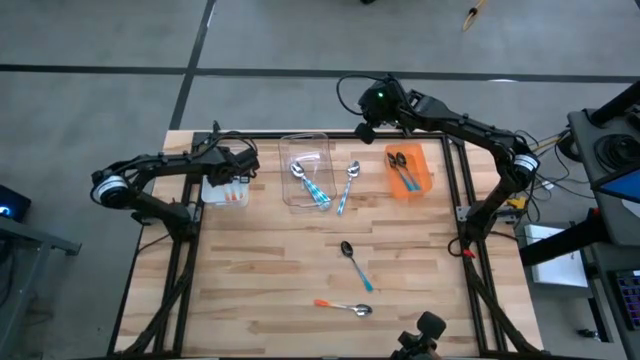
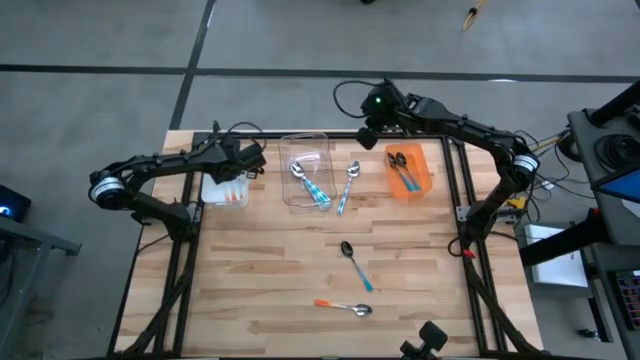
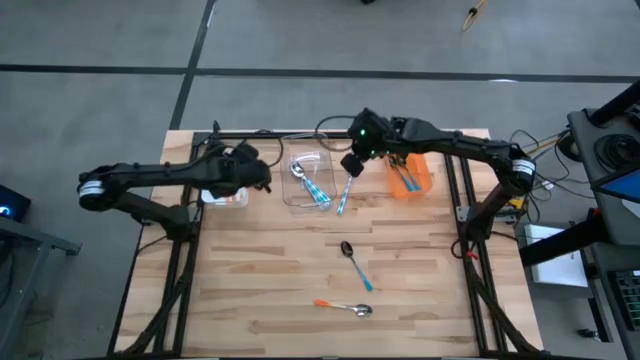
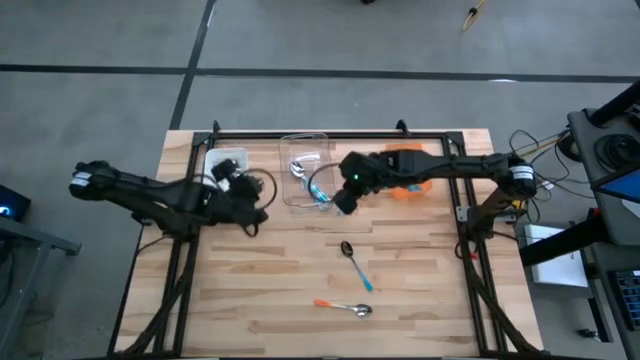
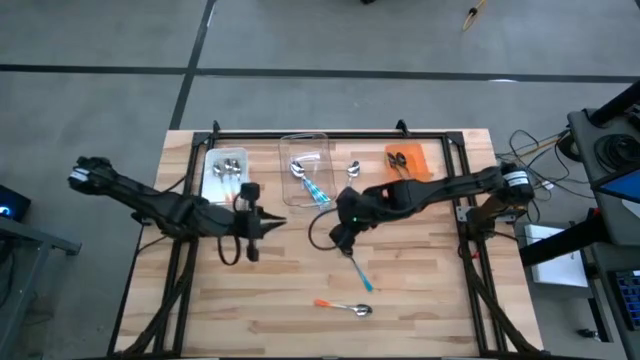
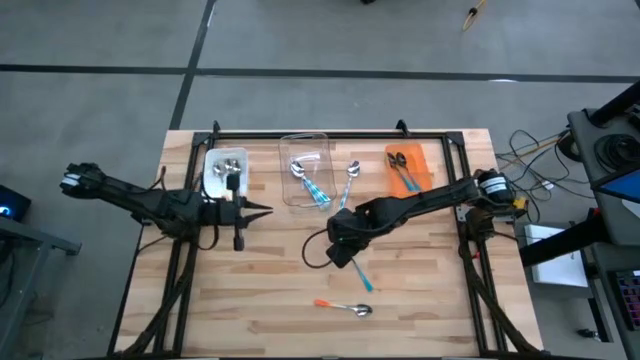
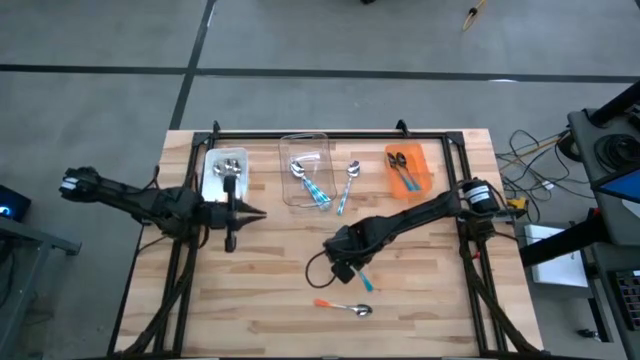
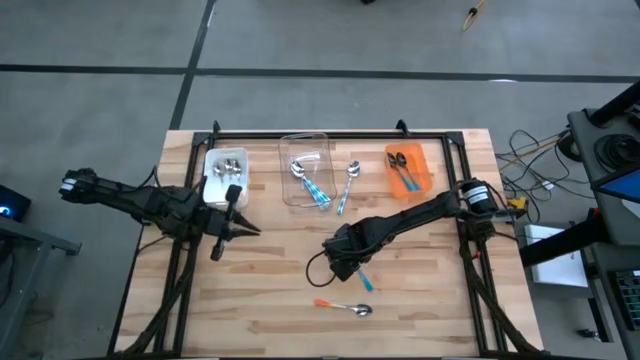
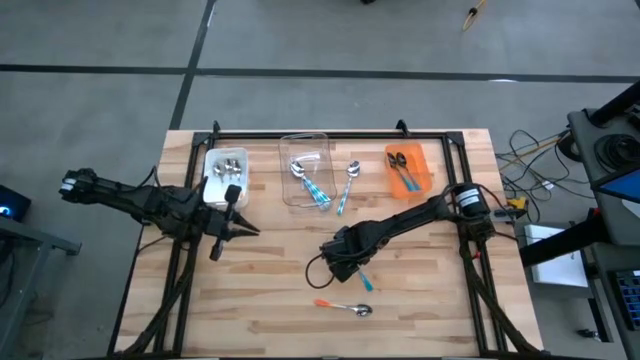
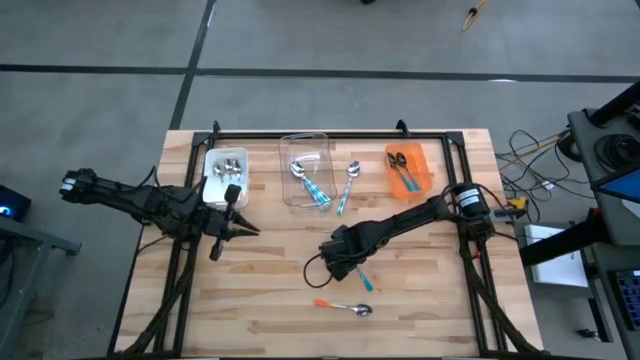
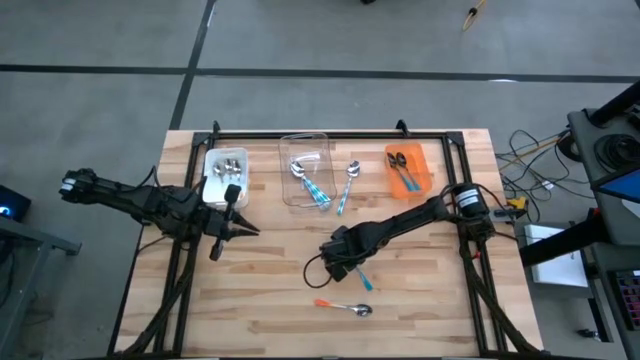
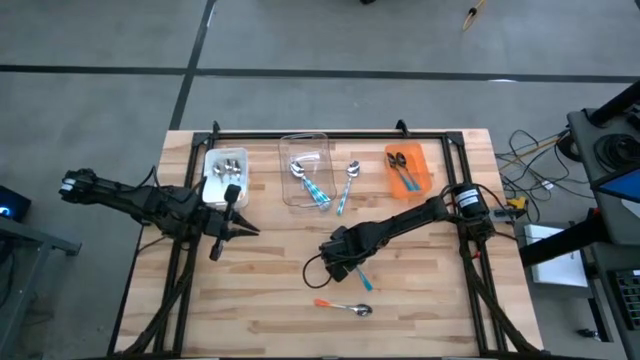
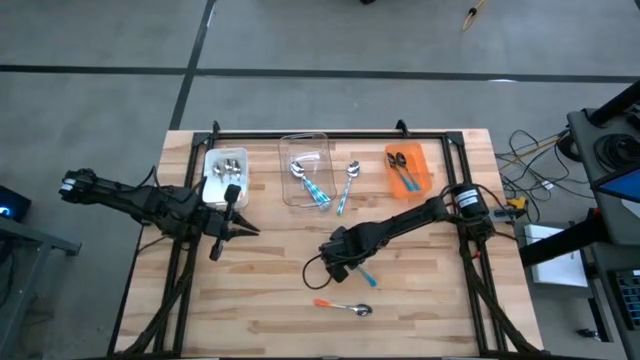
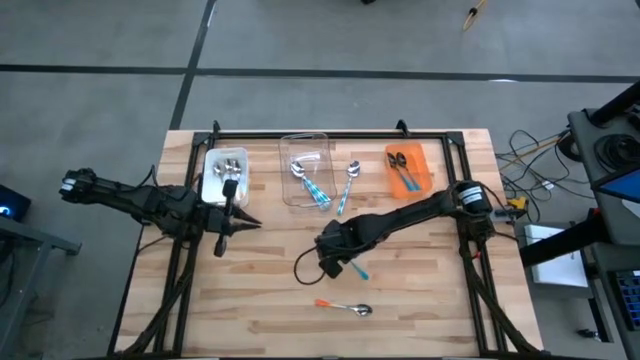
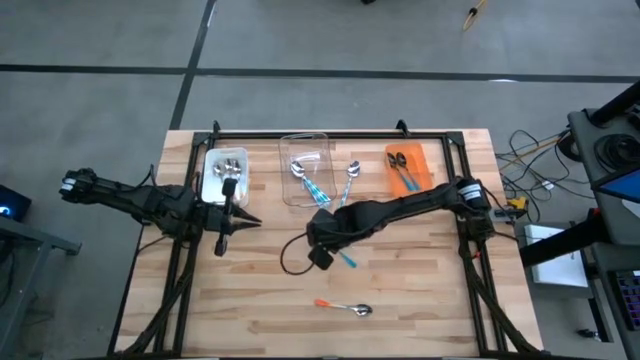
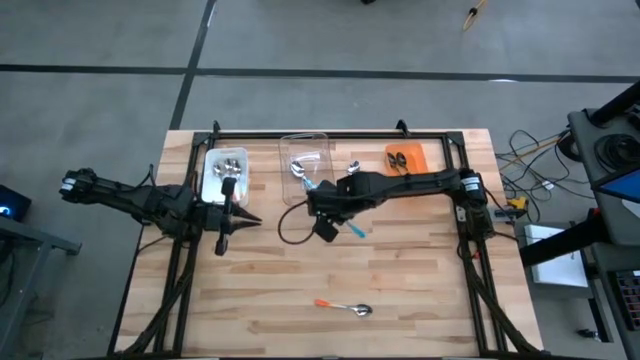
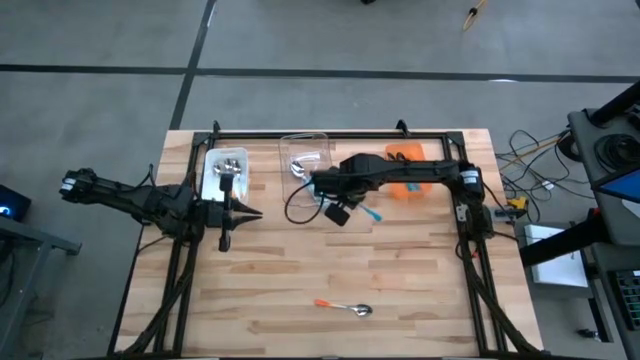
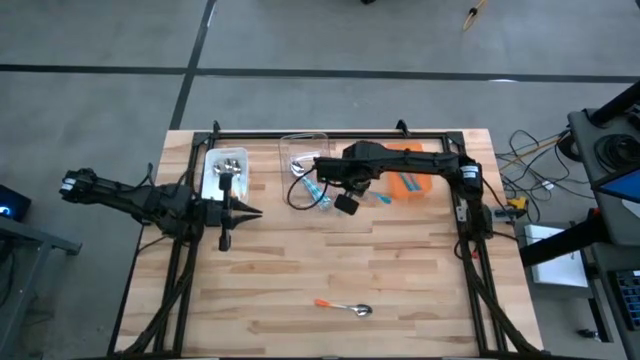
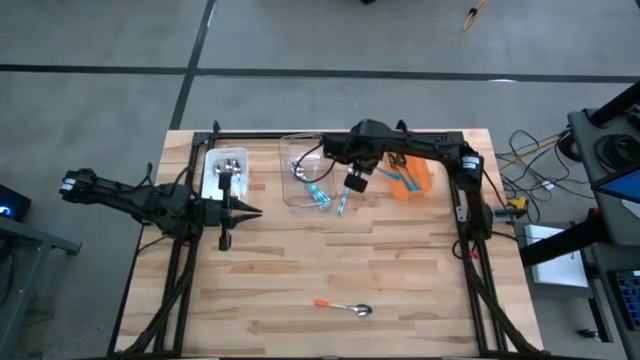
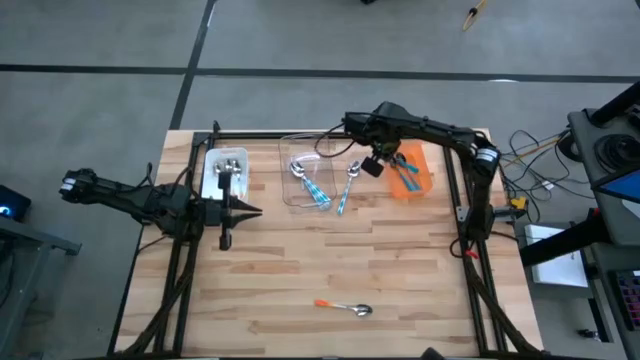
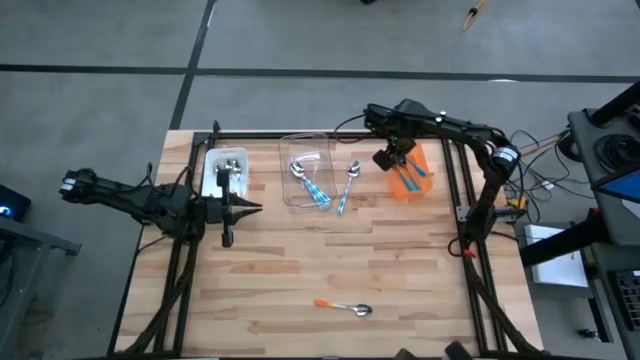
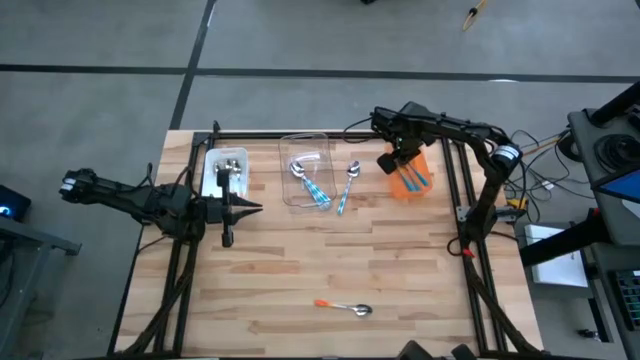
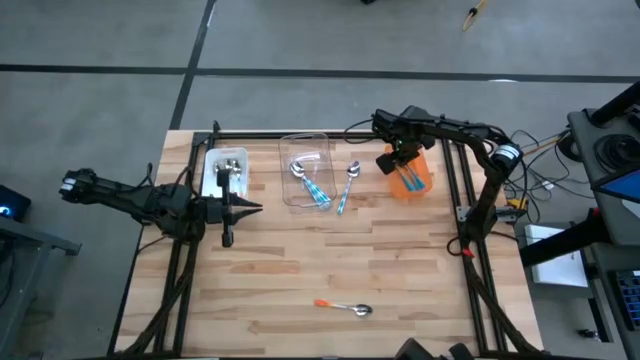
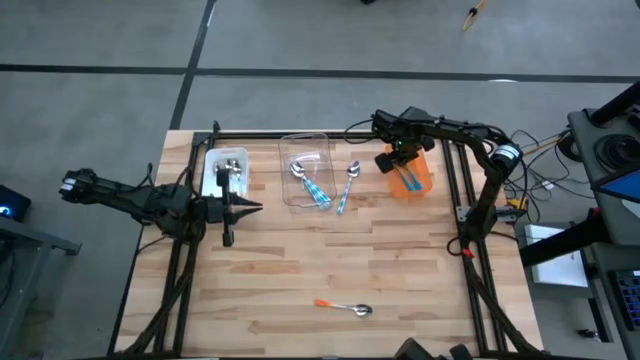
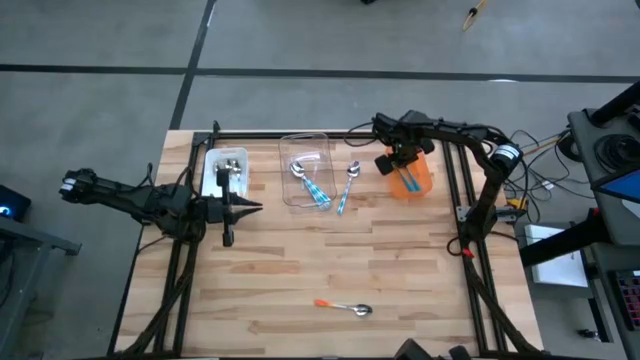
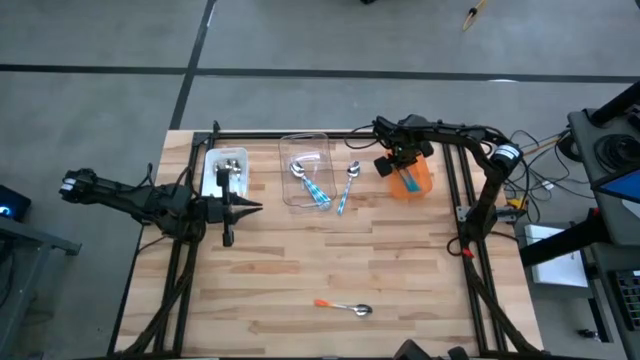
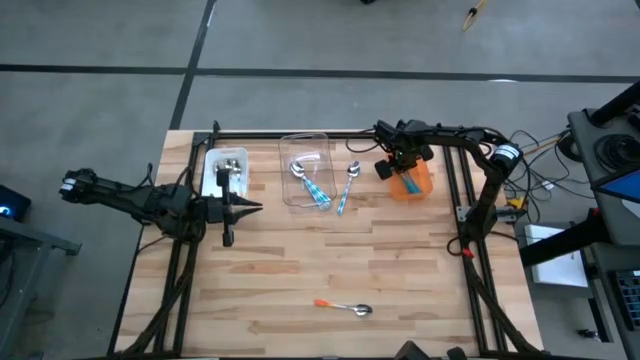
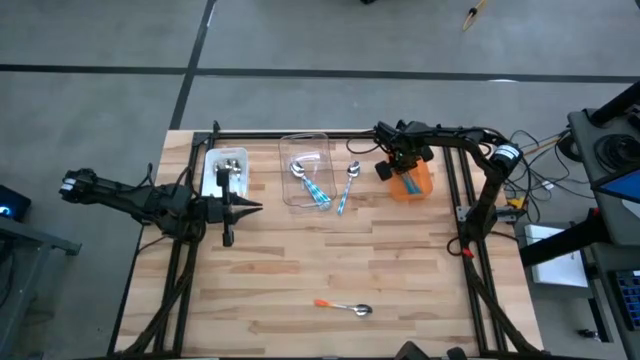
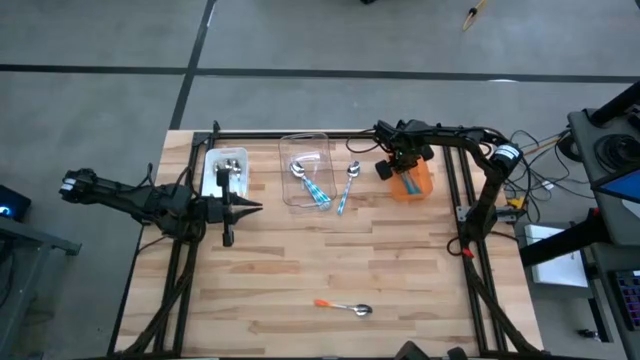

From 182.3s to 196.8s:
Task: Sort silverware by color (type)
Put the blue spoon into the orange bin

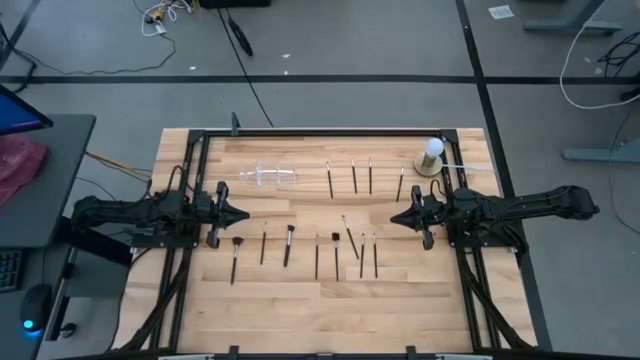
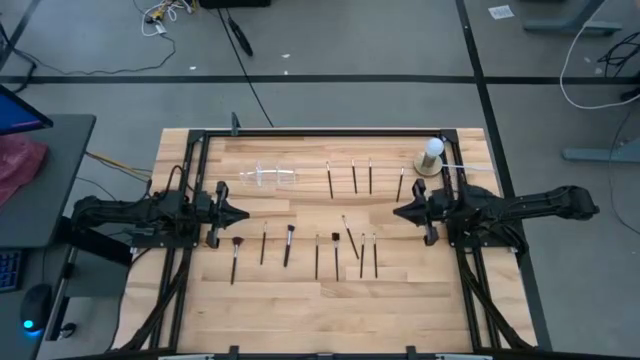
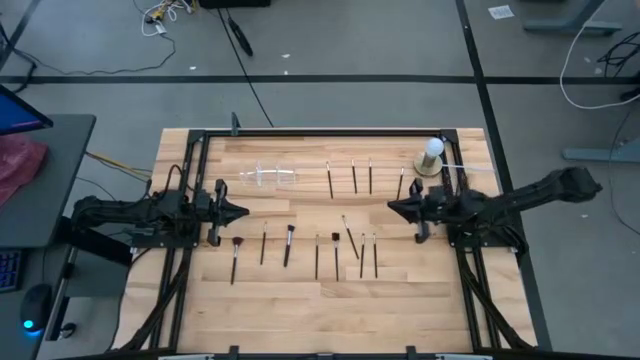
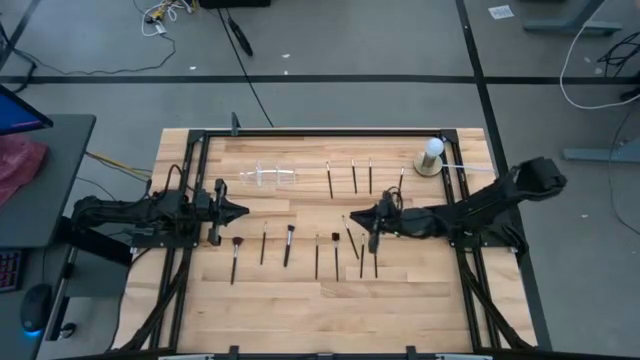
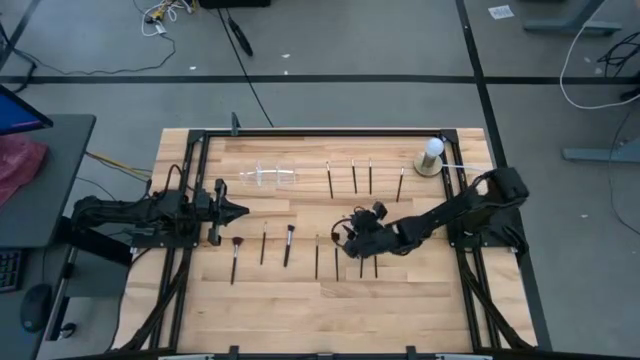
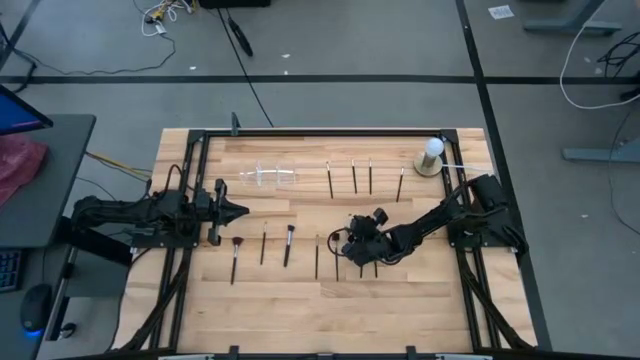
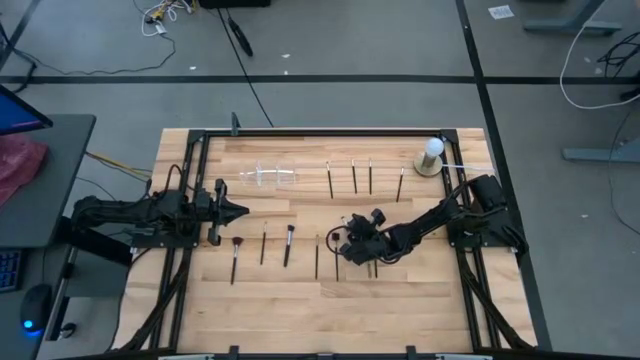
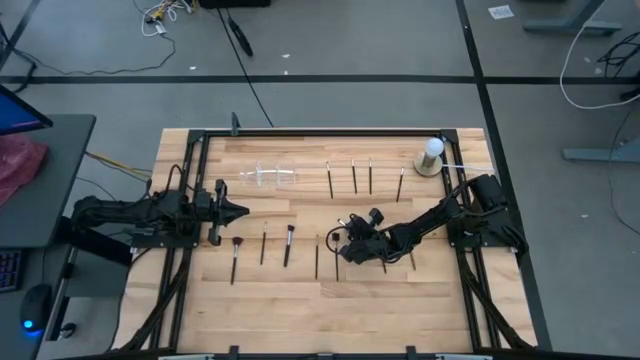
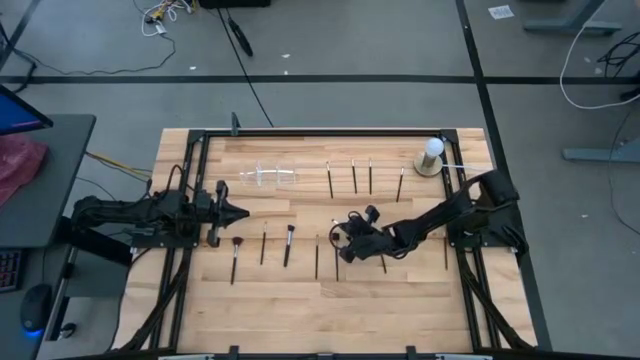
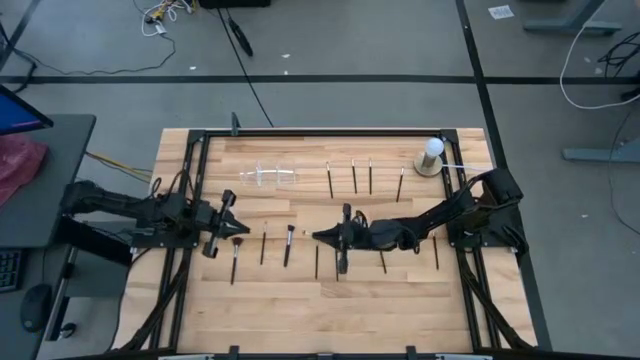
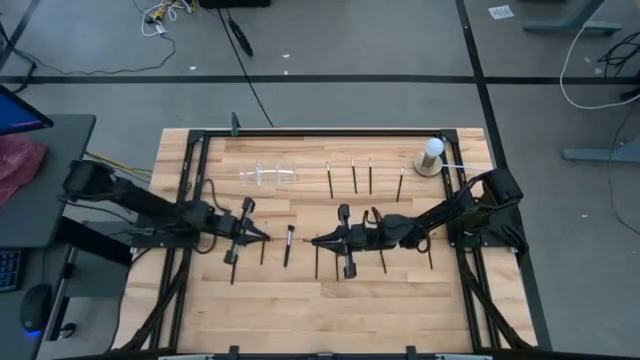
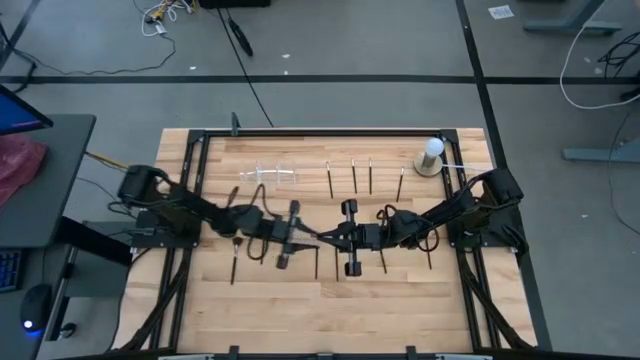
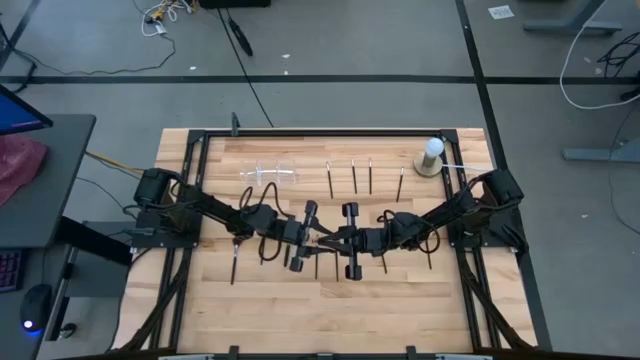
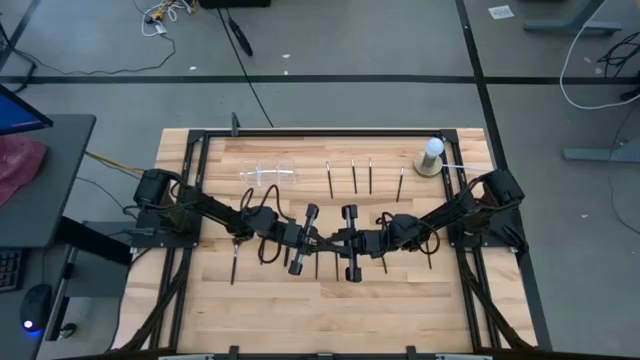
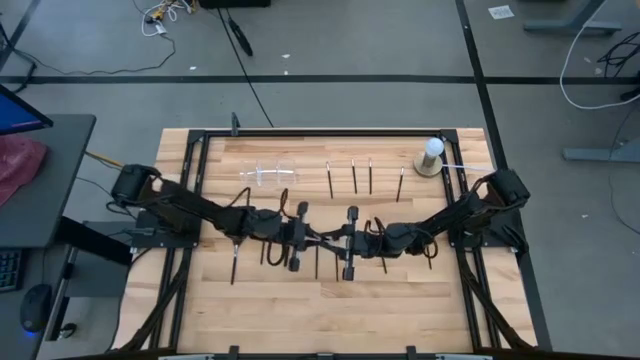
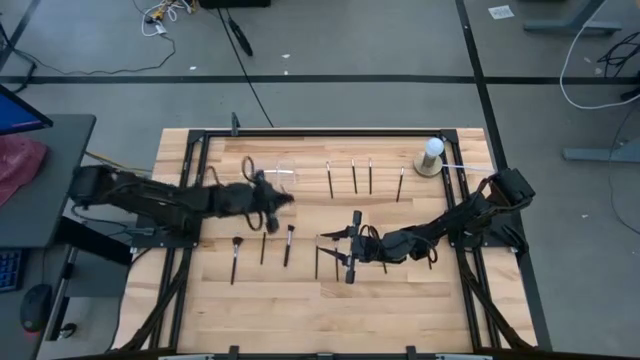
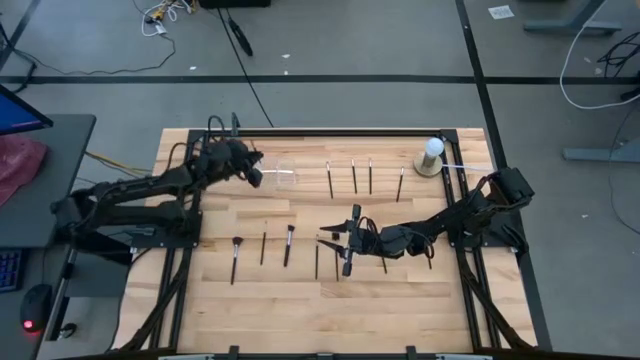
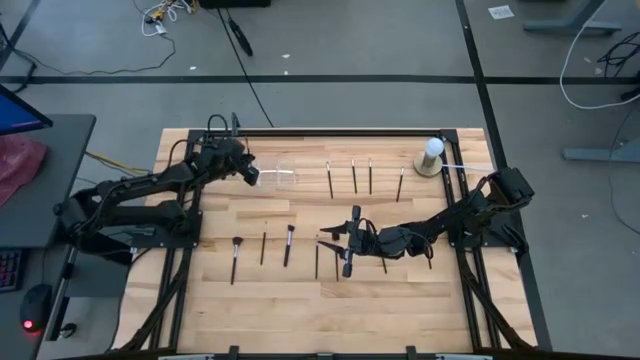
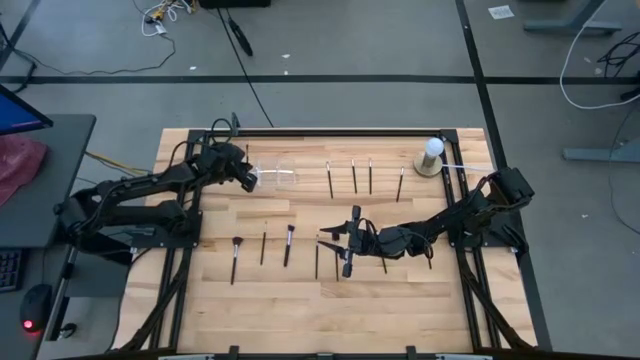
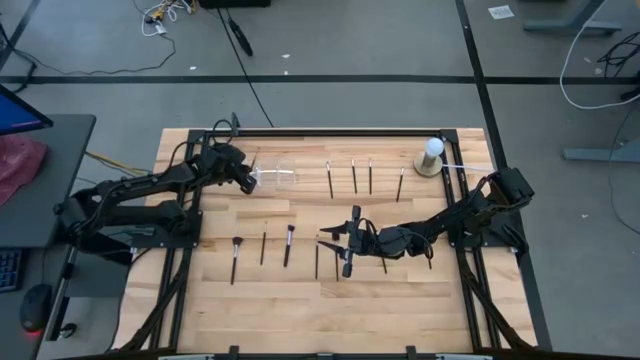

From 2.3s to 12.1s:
Task: Put items in baskets/containers
Put the eyeshadow brush into the transparent organizer
